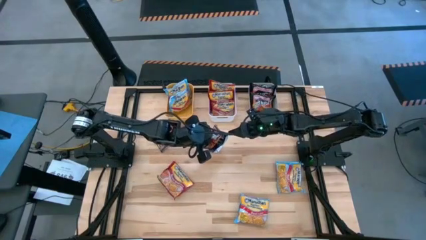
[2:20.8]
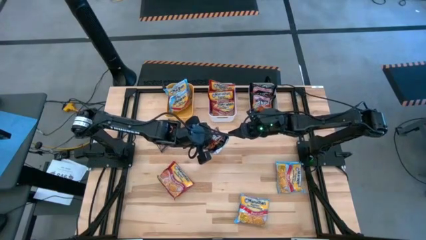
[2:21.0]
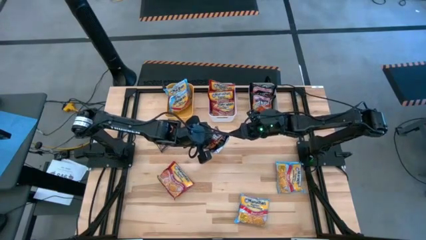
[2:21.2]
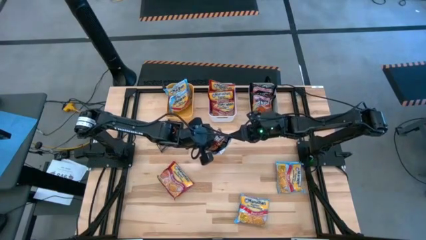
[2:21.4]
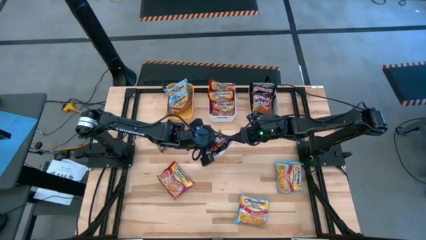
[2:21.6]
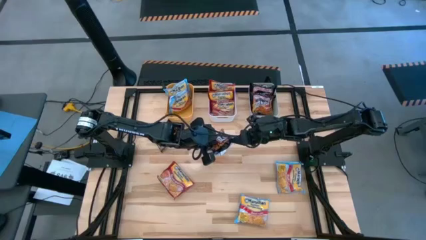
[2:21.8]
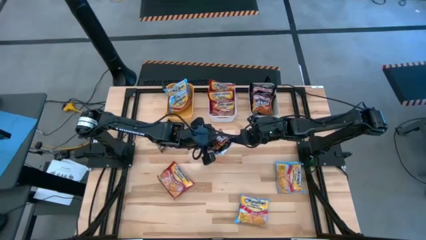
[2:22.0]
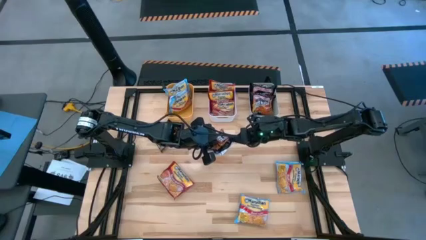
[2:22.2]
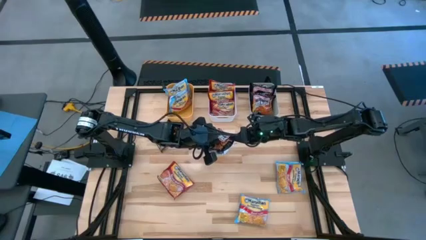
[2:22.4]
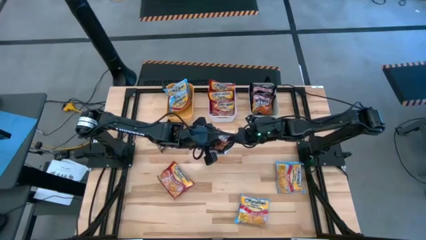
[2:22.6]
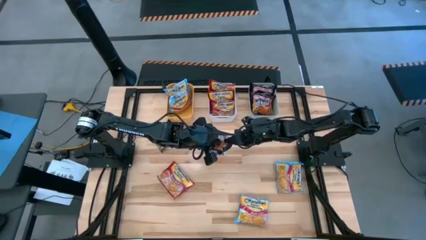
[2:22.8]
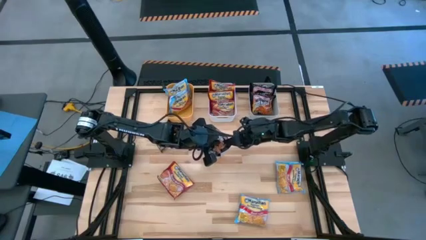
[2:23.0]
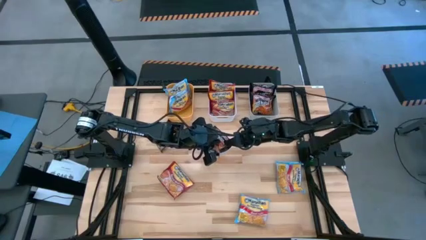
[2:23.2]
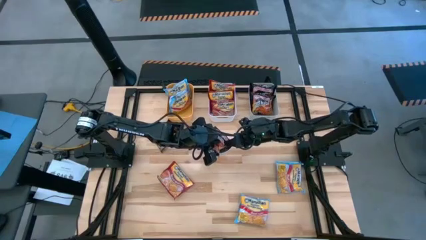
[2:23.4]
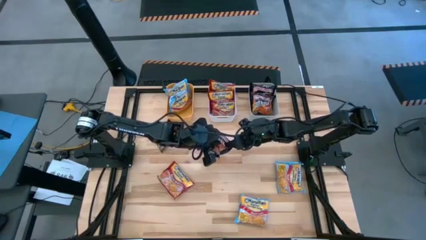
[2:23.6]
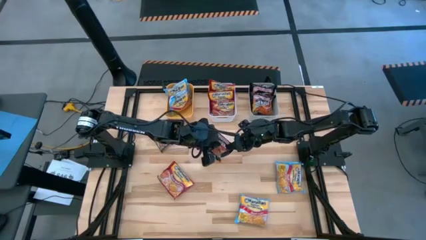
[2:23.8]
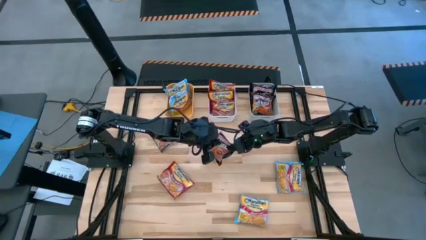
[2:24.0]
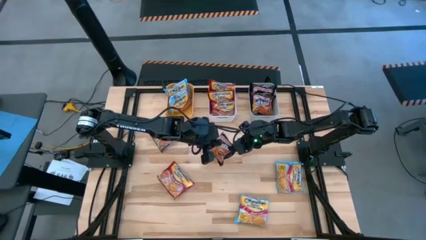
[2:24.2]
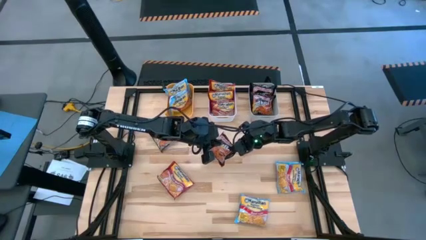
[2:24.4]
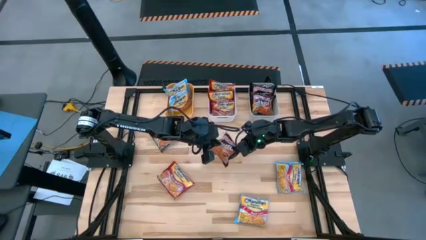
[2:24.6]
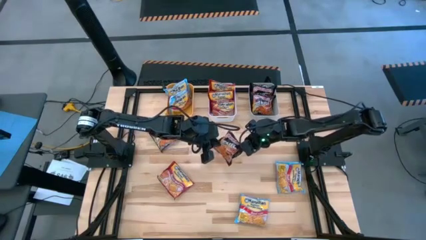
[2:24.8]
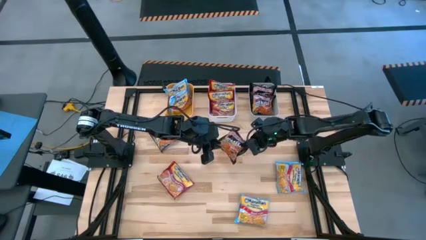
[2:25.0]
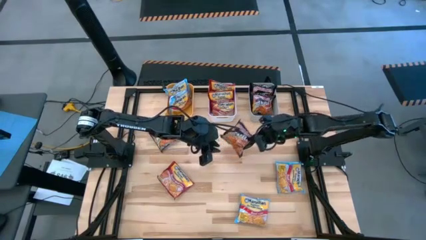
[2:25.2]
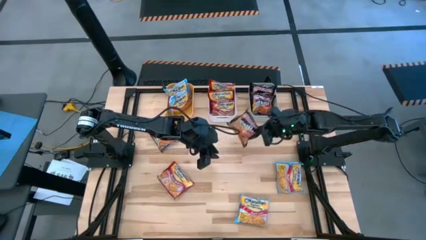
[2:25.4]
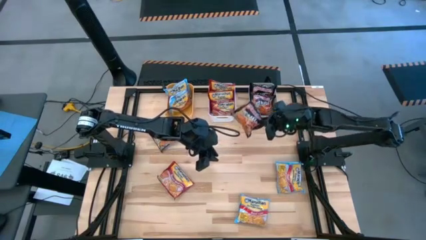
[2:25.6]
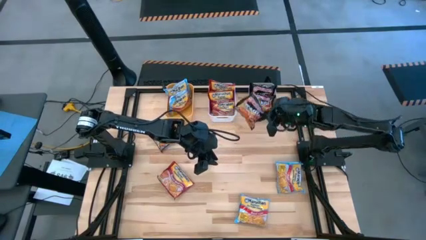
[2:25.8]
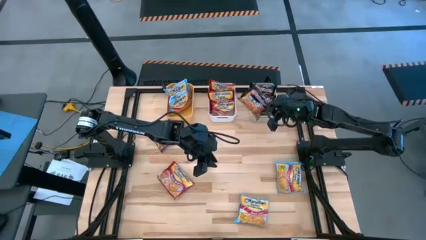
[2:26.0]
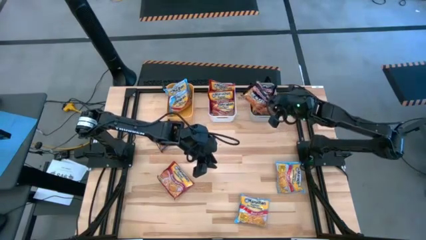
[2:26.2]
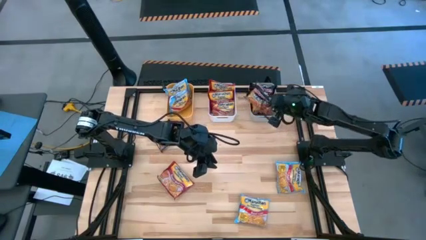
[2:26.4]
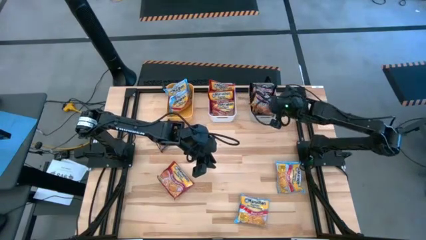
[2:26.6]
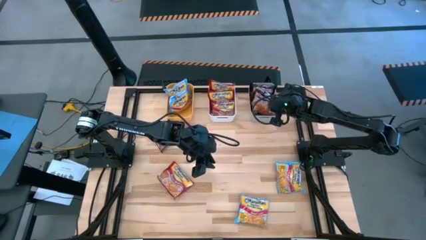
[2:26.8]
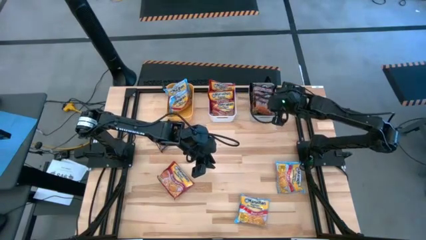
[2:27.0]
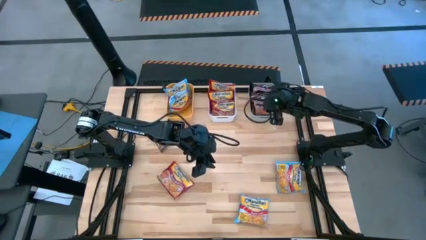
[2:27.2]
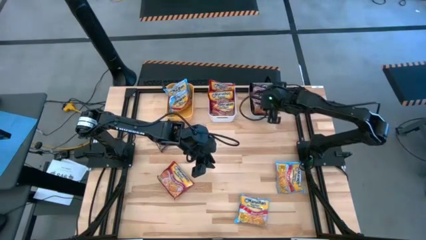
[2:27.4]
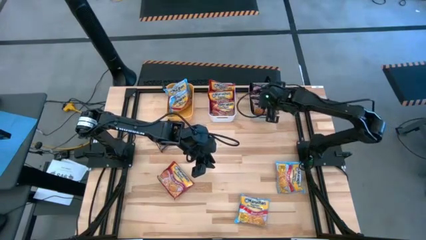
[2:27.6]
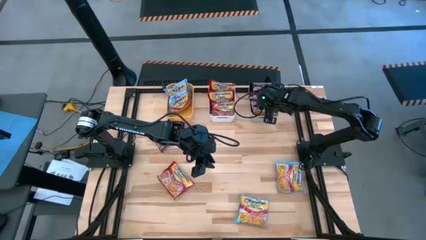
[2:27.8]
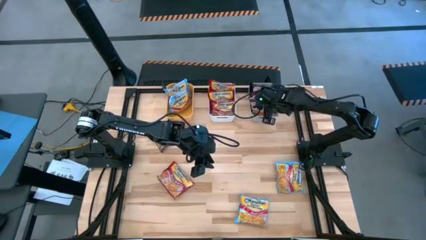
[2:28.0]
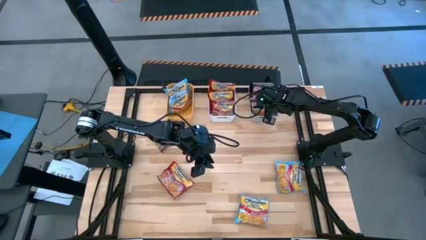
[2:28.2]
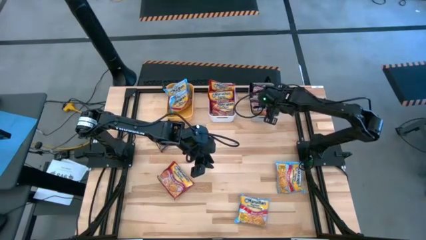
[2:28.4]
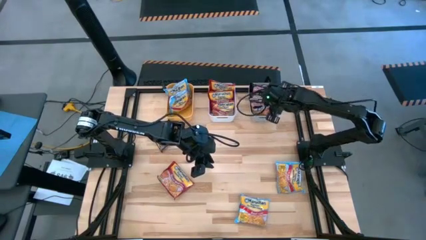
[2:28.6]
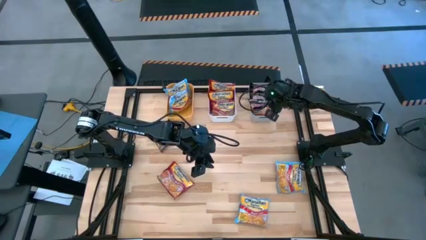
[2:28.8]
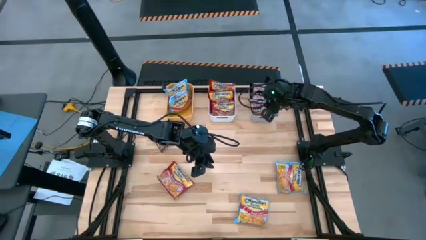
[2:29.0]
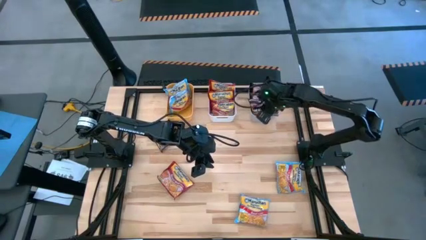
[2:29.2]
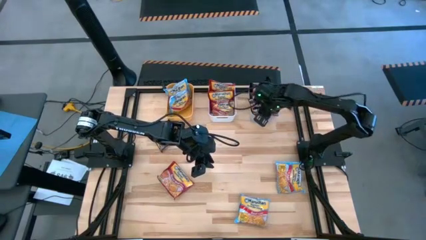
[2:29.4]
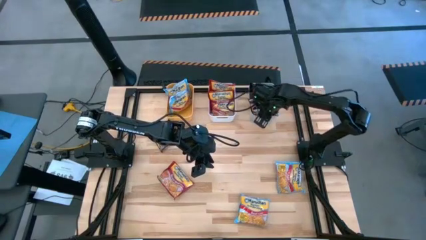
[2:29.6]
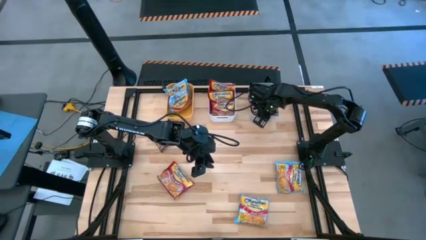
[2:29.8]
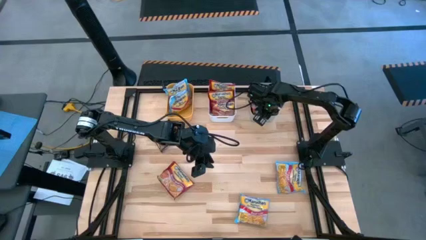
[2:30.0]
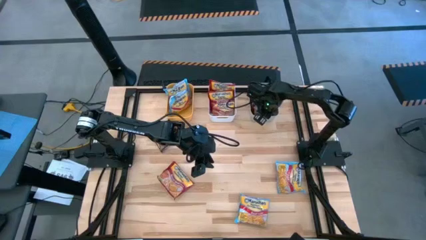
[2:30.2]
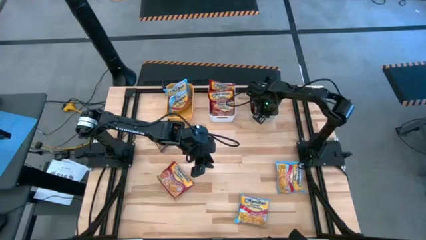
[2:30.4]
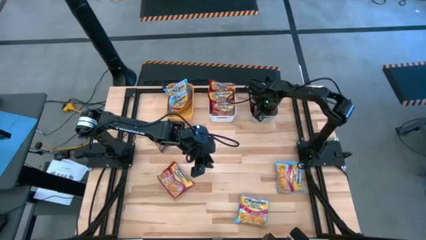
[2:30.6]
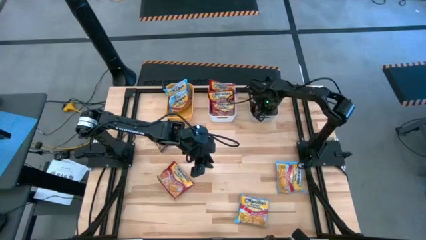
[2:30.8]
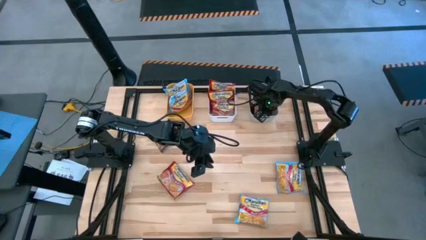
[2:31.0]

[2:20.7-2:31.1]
Task: Sort Maruchan noodles
Put the black noodle pack into the gray bin

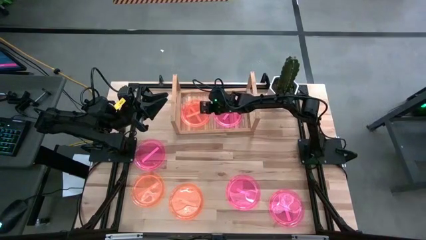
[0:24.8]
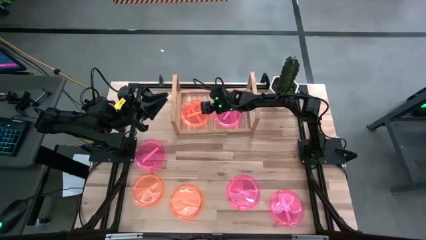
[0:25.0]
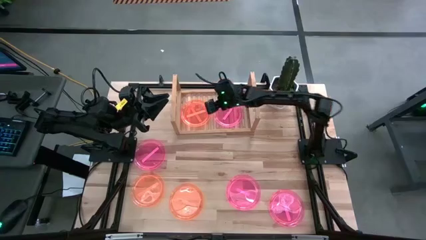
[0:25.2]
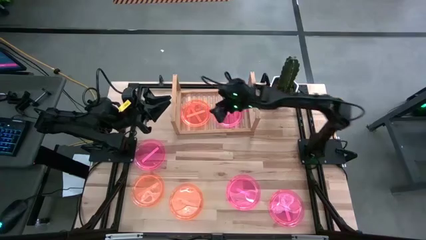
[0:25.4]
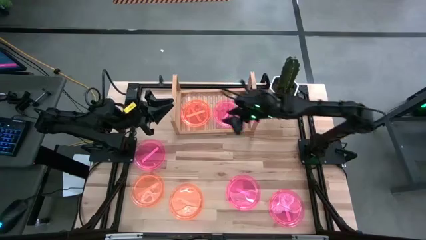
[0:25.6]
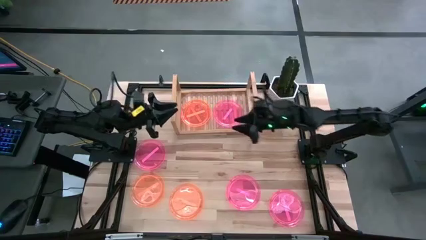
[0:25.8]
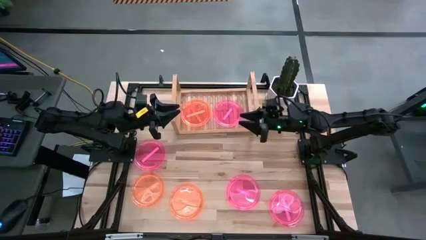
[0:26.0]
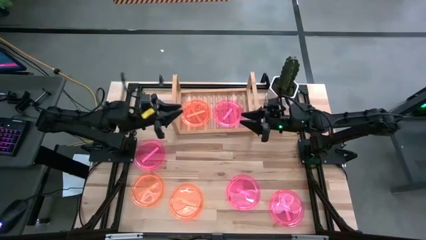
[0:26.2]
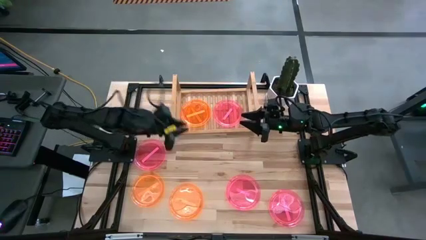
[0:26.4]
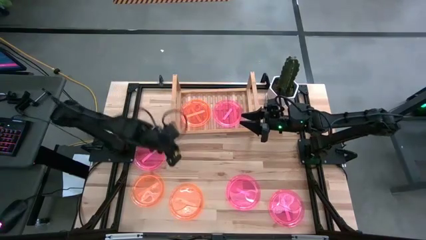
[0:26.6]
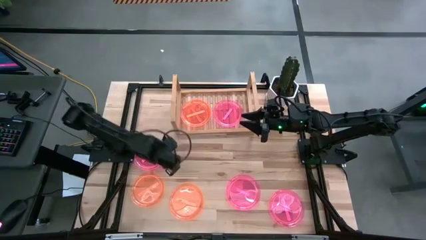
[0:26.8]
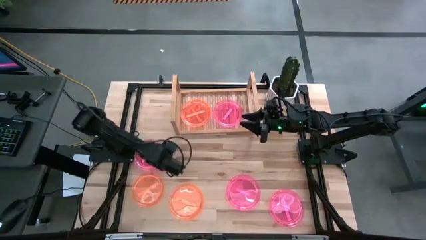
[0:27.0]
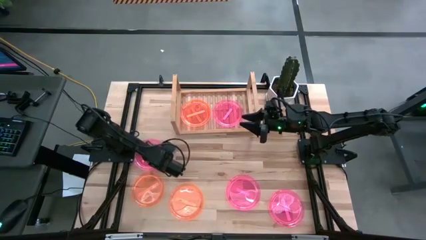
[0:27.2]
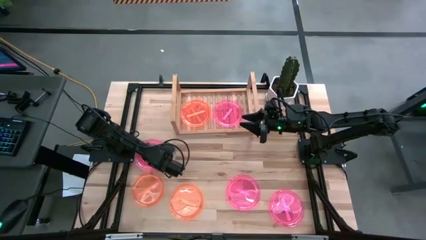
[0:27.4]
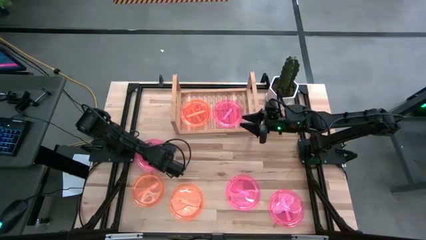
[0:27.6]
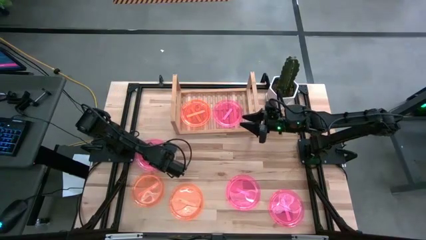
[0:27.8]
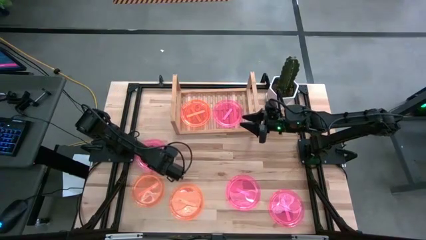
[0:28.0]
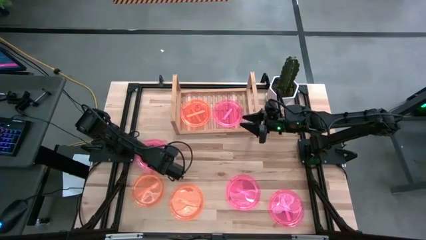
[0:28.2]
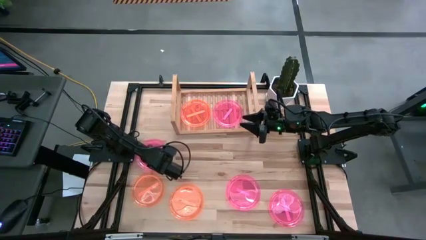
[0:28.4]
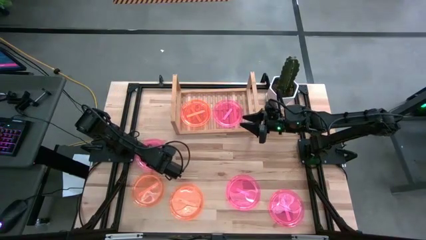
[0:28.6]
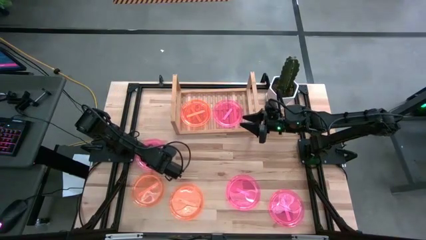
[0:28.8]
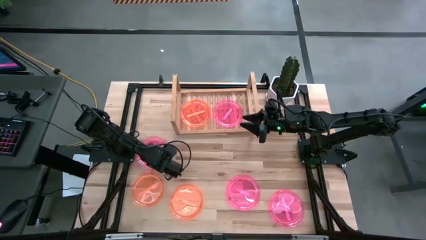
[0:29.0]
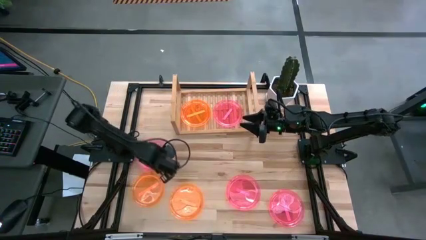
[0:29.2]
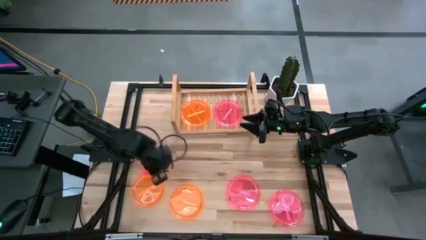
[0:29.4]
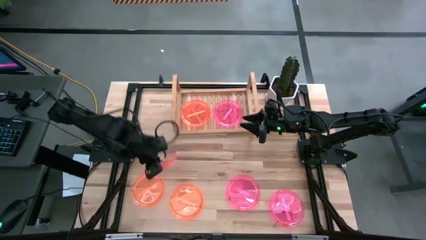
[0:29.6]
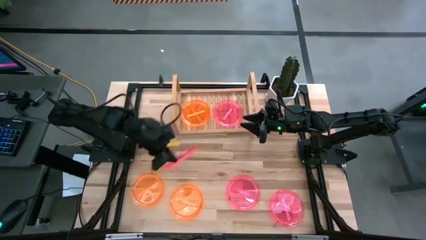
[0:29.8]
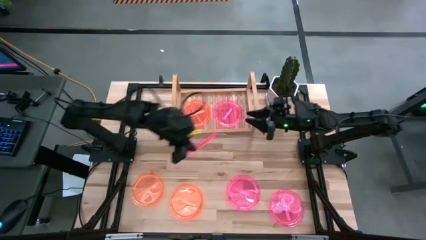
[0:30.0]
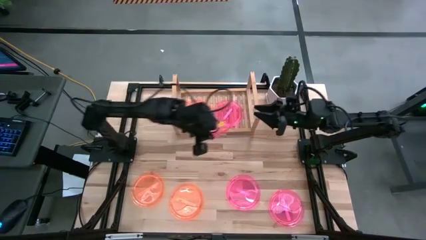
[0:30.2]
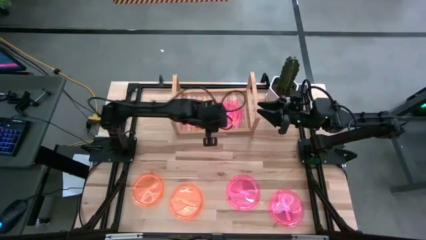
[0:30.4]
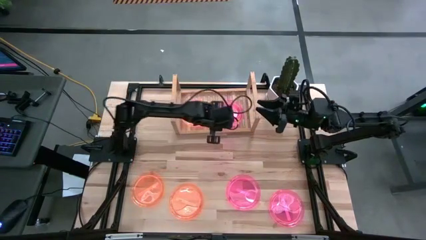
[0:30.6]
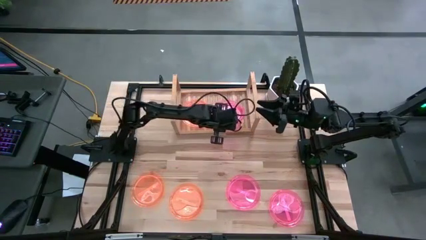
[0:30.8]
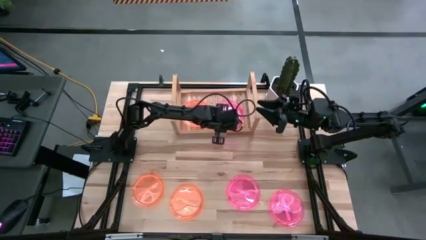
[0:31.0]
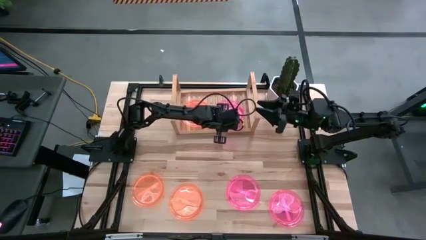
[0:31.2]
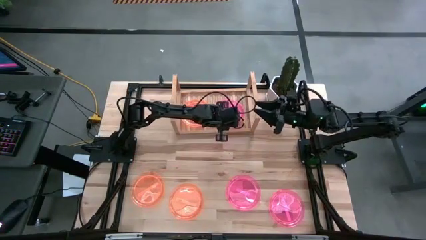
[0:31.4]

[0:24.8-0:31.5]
Task: Place and stack plates onto a shelf
Stack the top left pink plate on top of the pink plate
